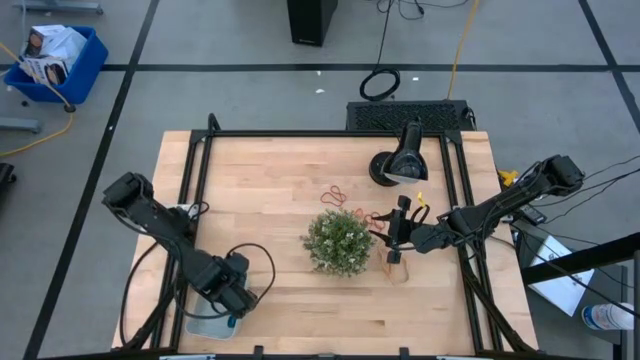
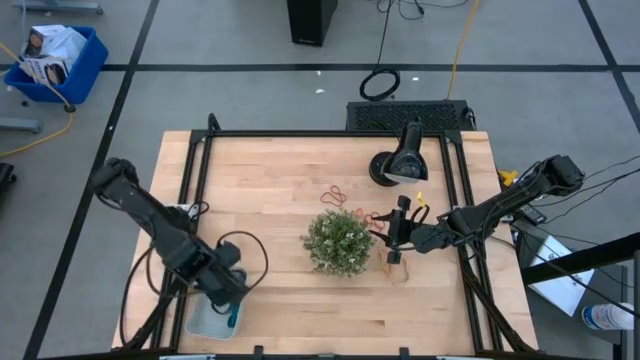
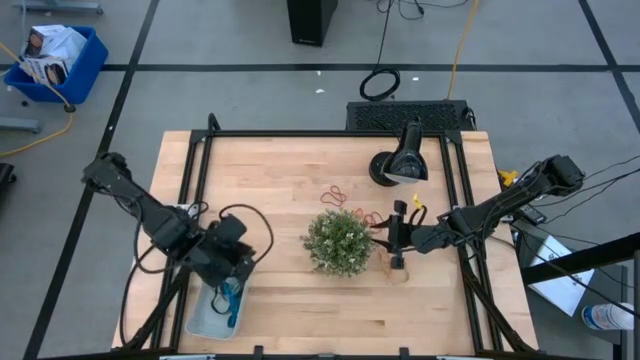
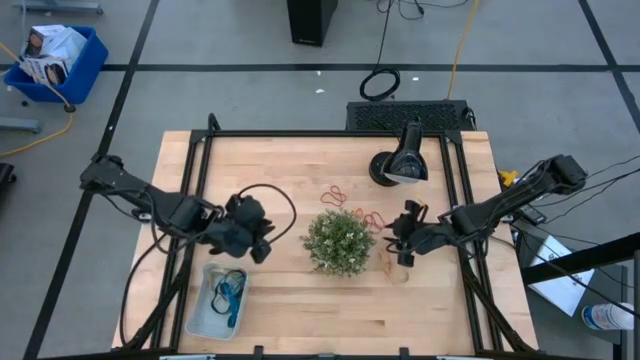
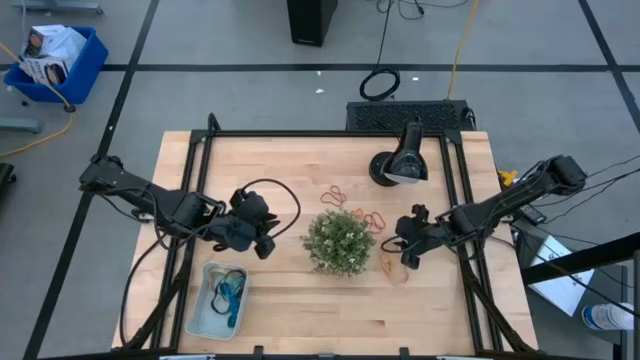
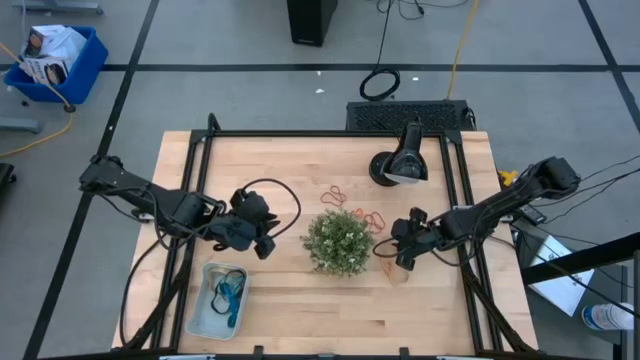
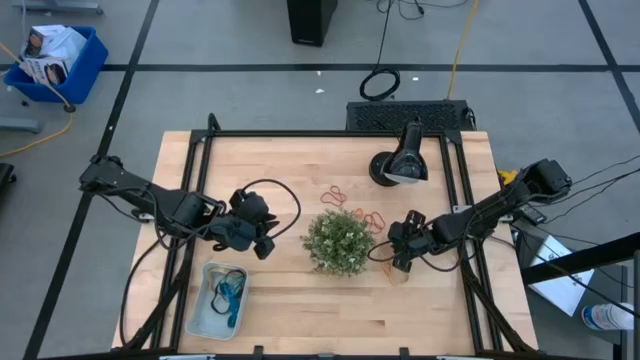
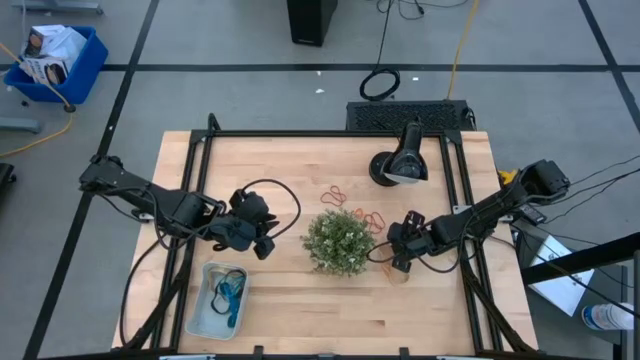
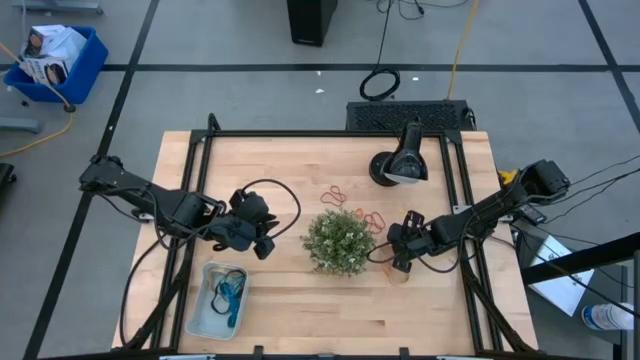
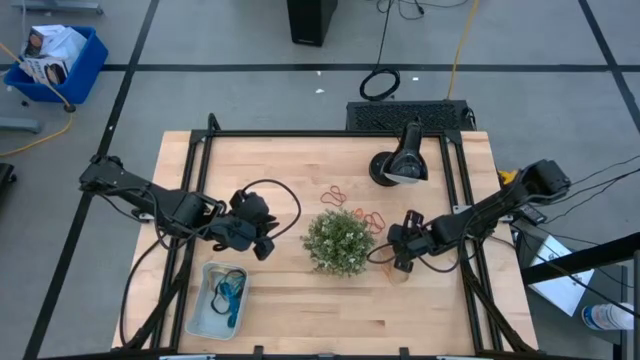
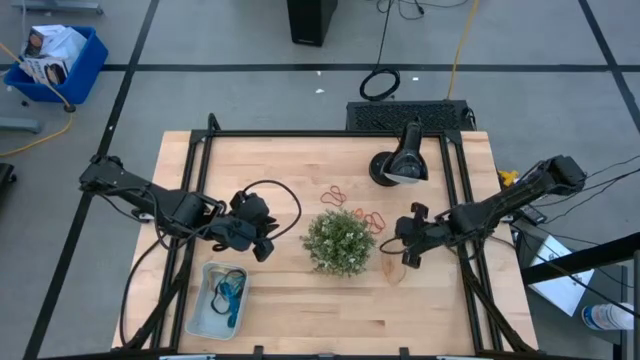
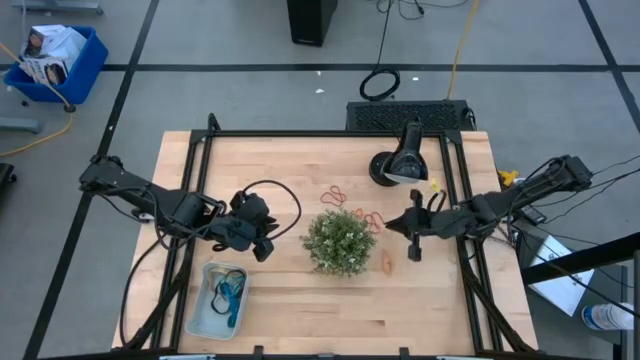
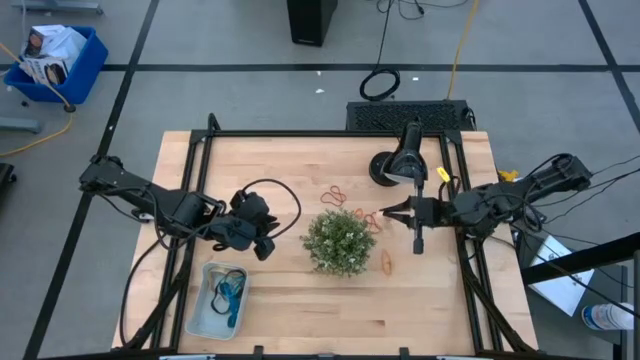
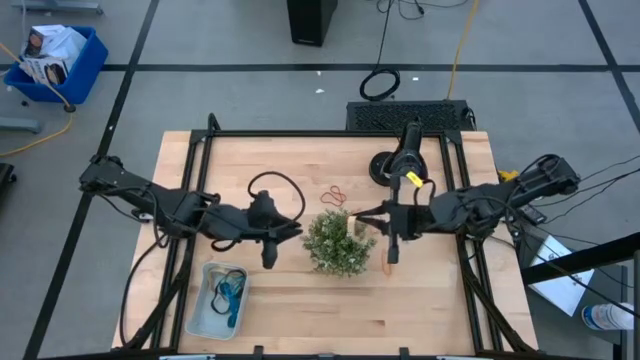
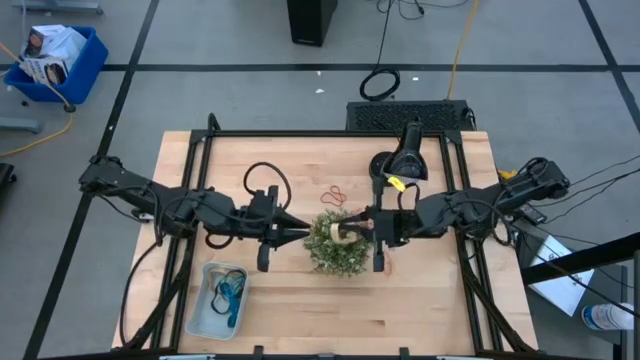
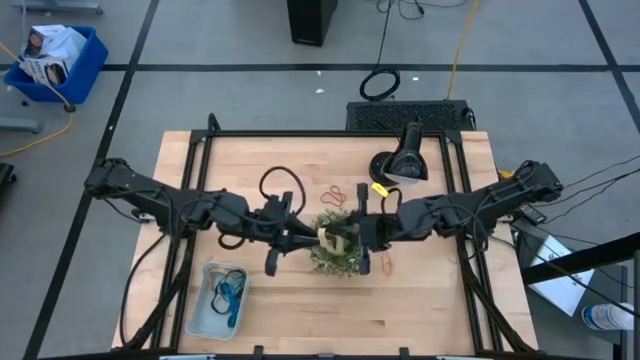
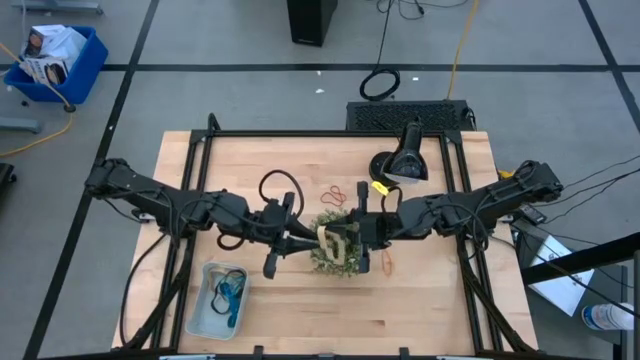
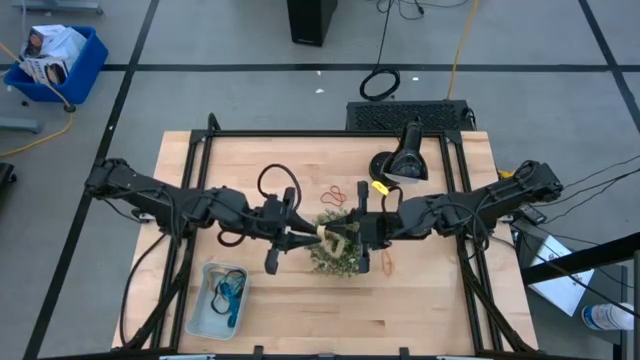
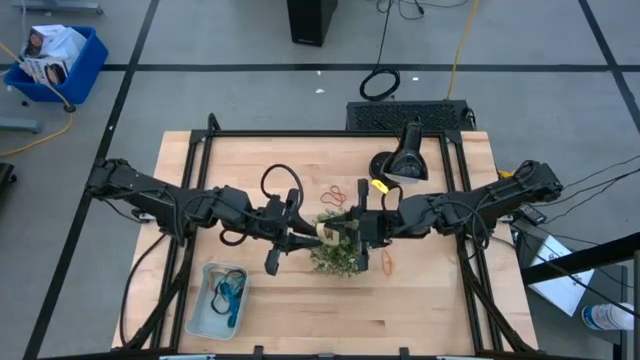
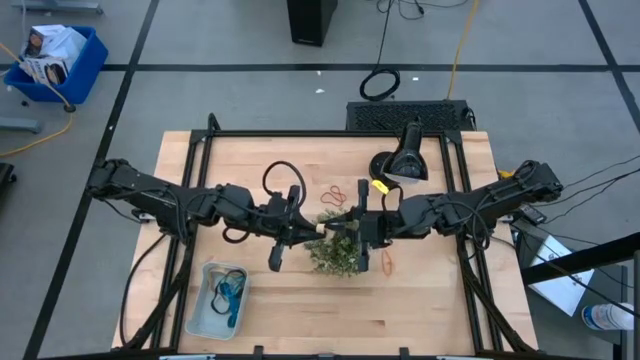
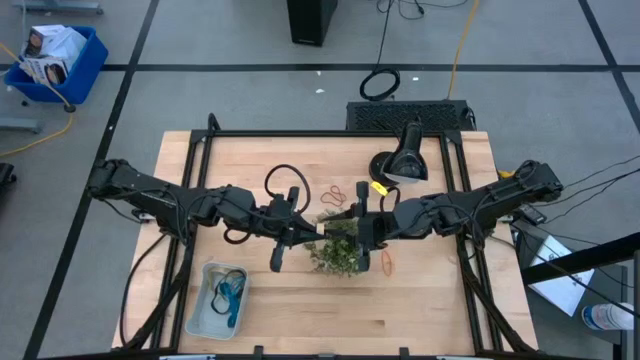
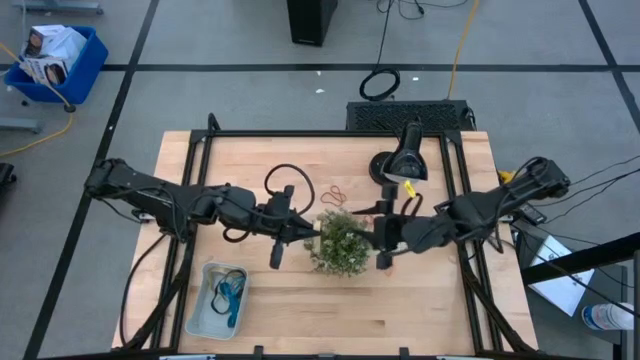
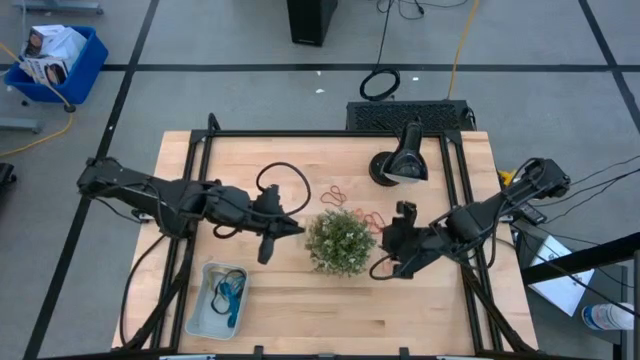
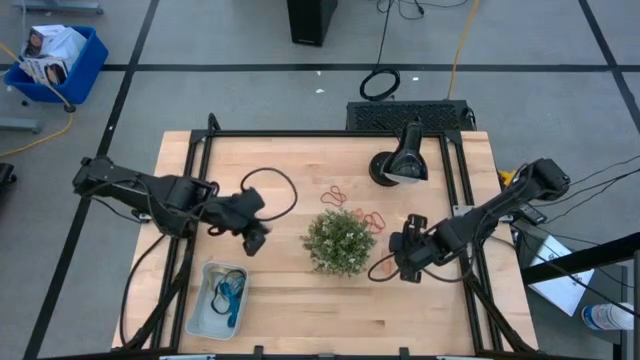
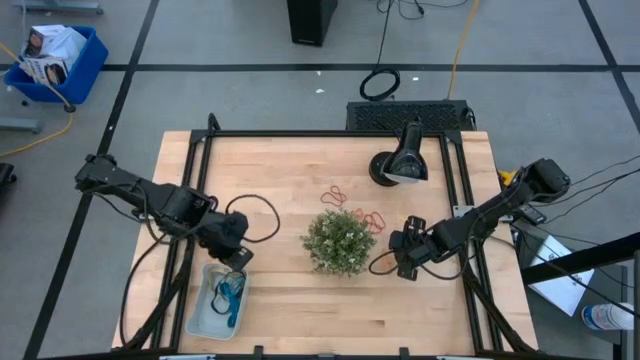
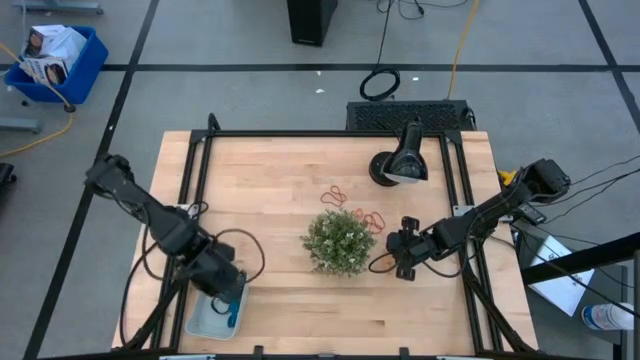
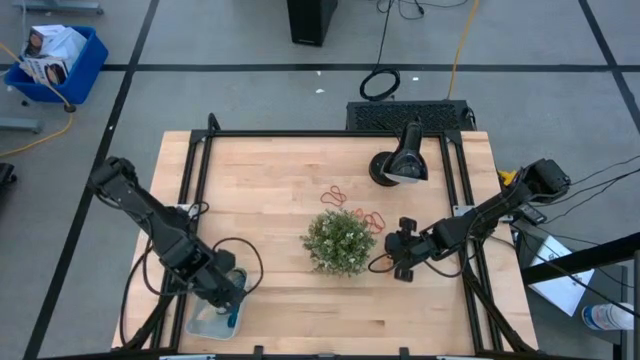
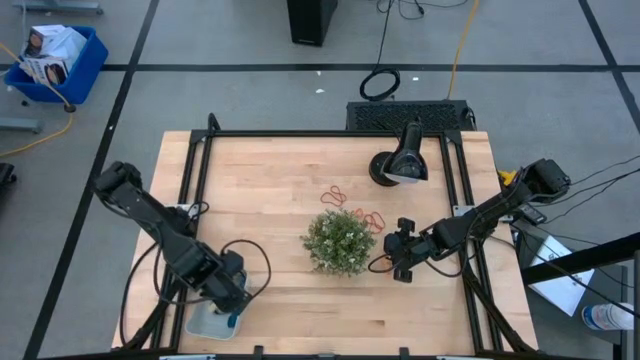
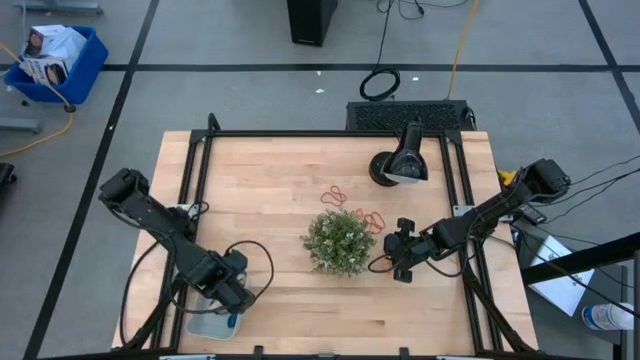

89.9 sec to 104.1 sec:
Task: Pick and place rubber bands into bin
Put the light brown rubber band into the blue bin

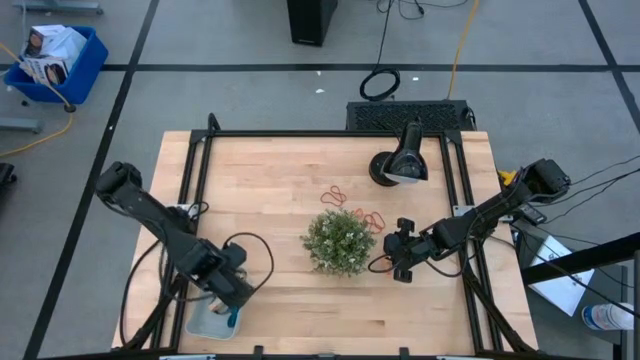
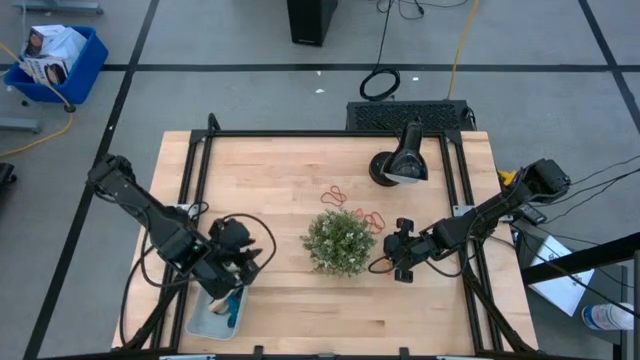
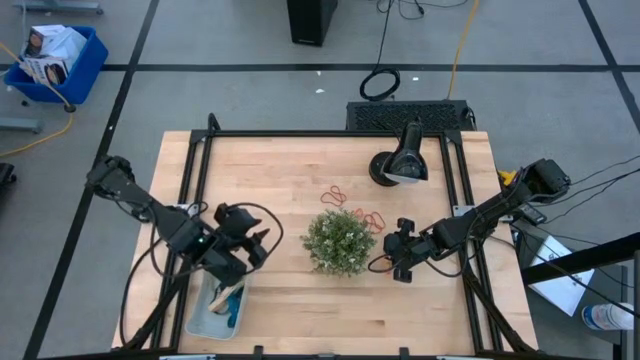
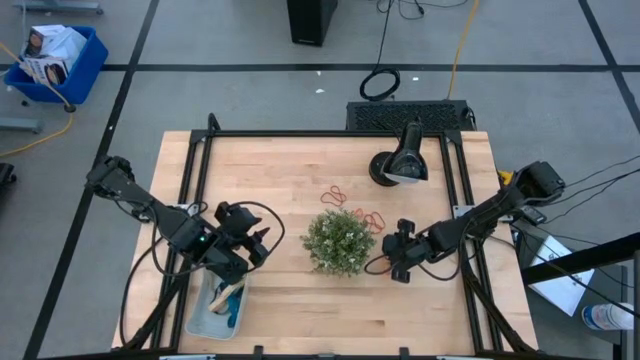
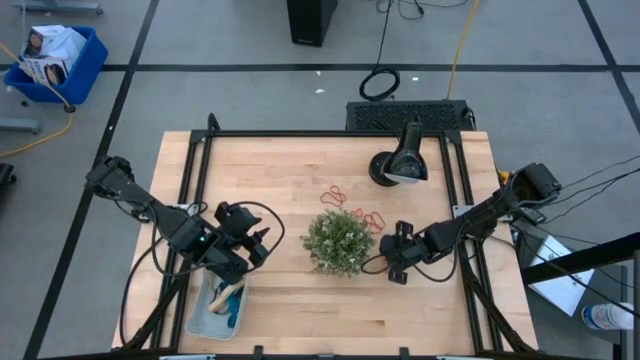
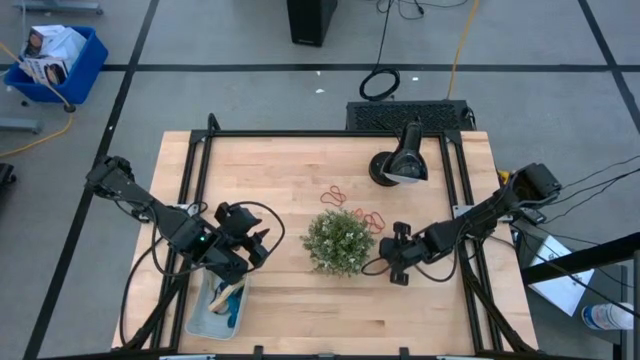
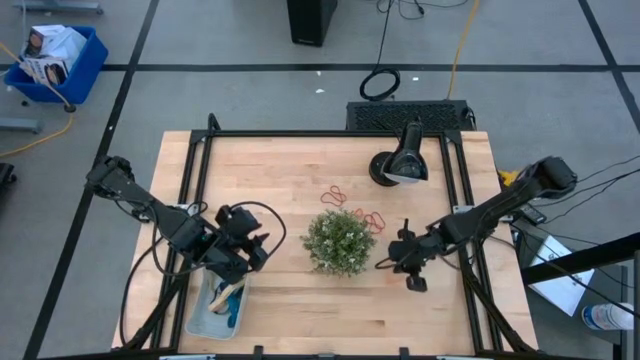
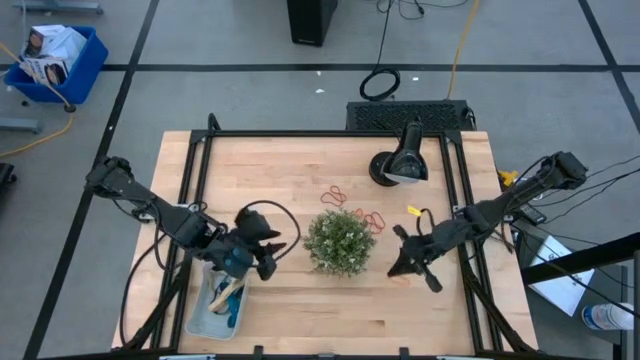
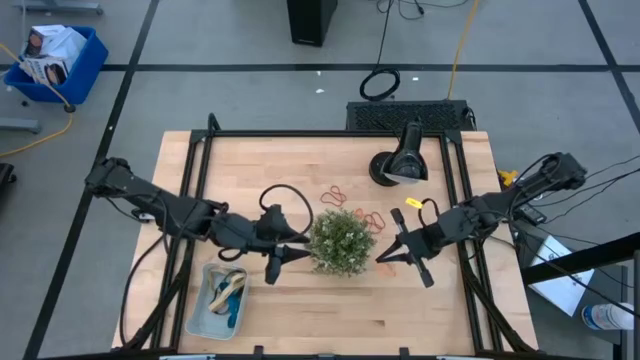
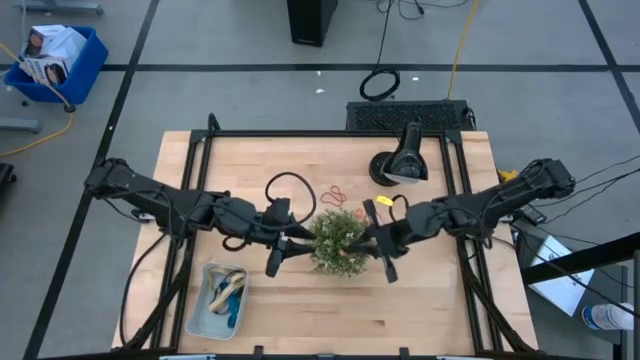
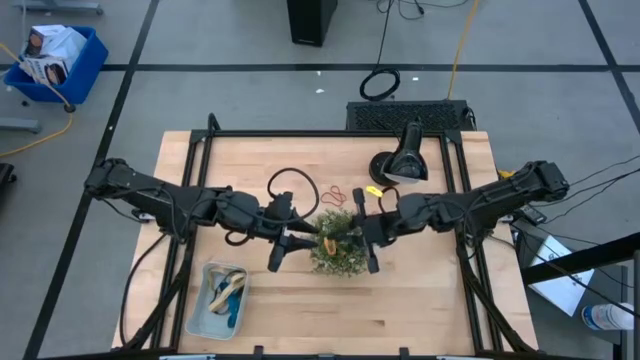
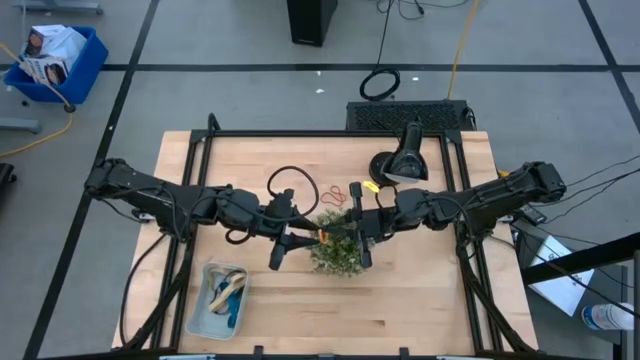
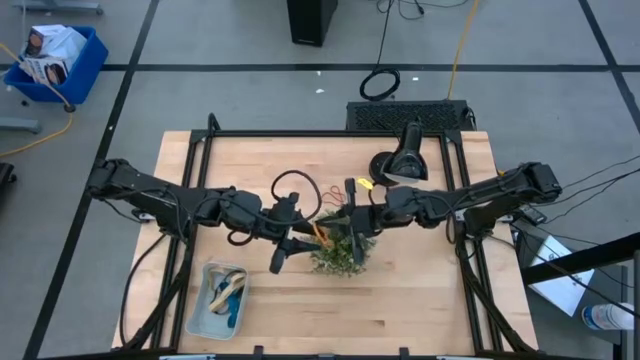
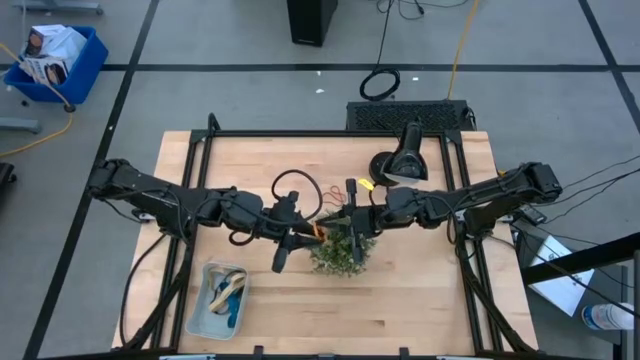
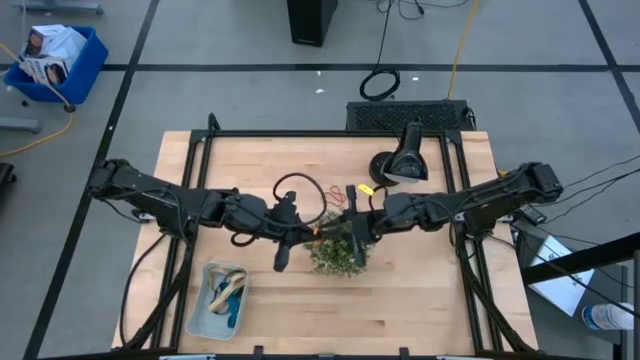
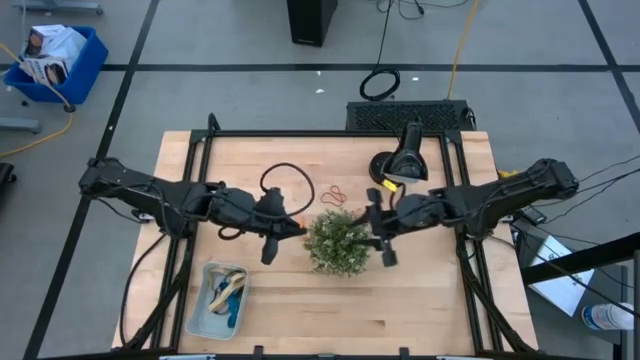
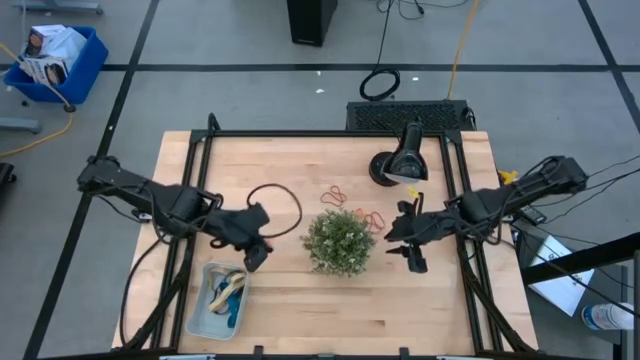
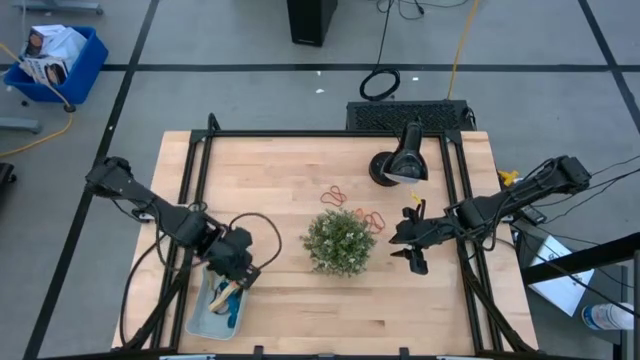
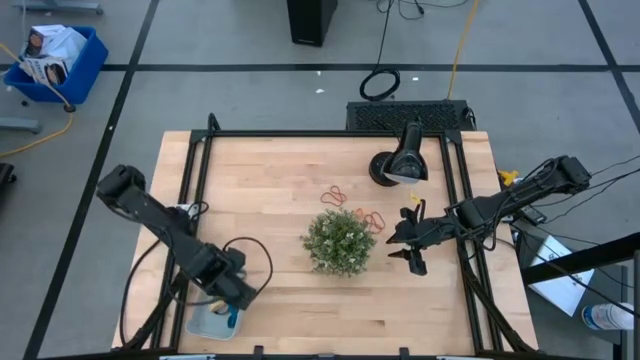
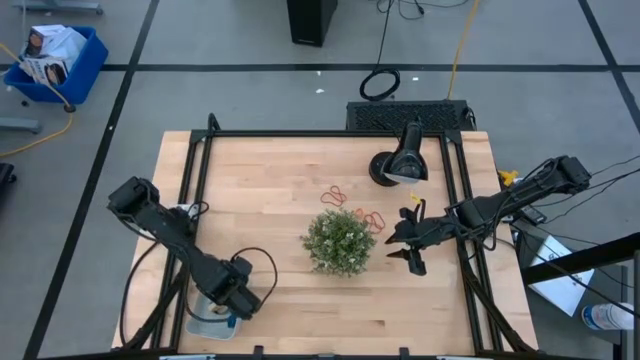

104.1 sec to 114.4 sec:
Put the bottom orange rubber band into the blue bin
